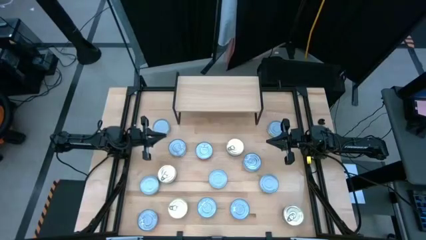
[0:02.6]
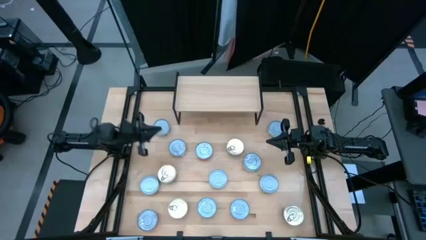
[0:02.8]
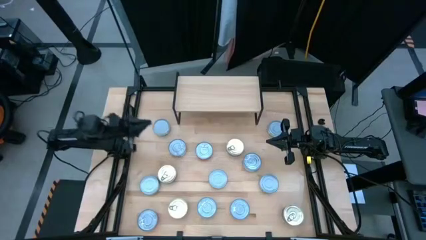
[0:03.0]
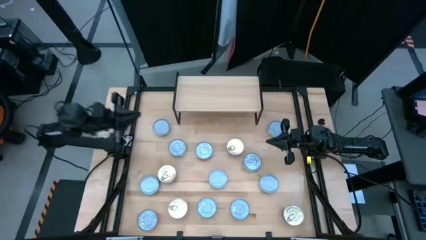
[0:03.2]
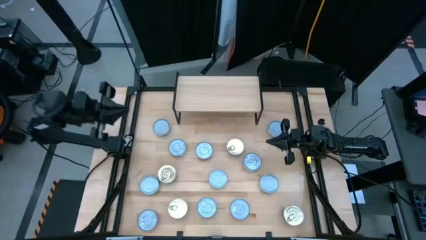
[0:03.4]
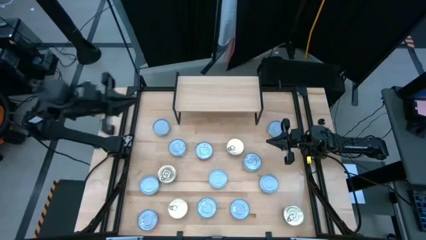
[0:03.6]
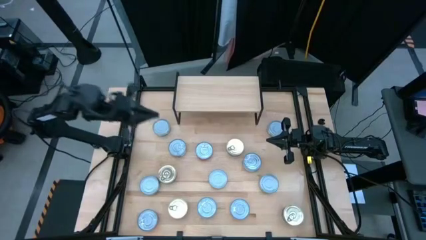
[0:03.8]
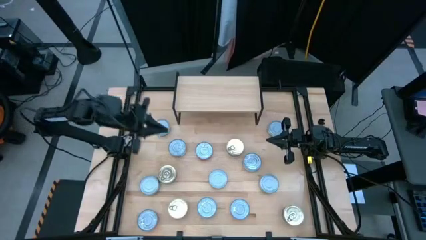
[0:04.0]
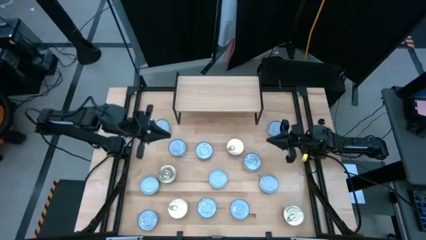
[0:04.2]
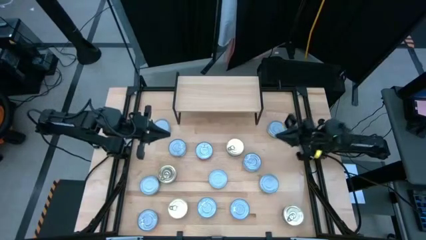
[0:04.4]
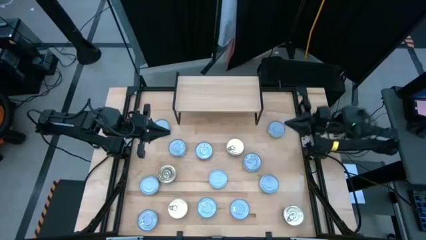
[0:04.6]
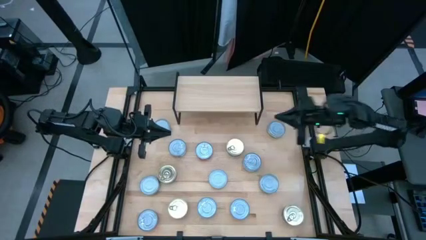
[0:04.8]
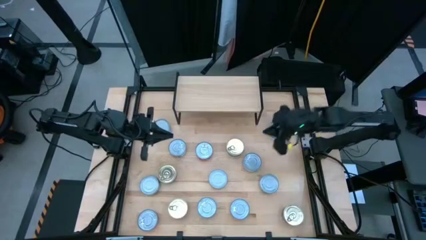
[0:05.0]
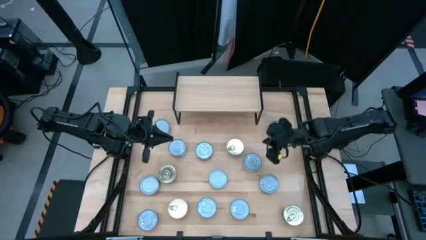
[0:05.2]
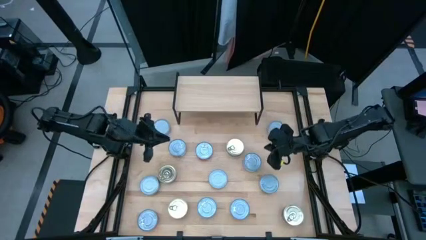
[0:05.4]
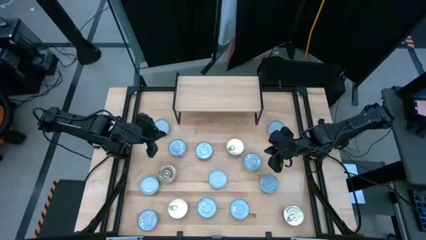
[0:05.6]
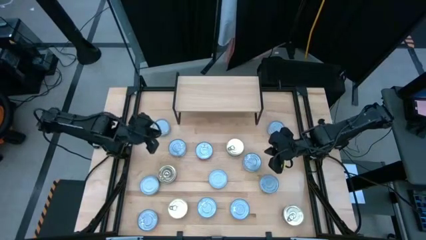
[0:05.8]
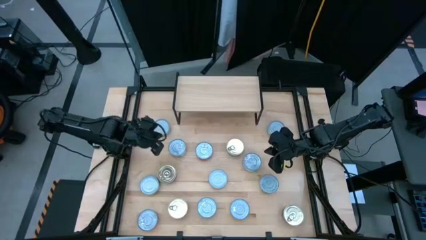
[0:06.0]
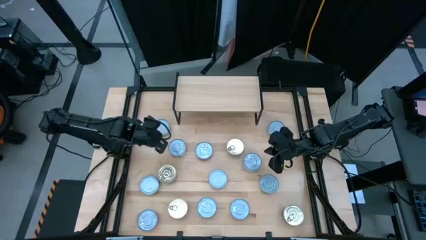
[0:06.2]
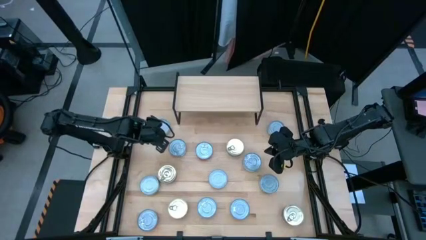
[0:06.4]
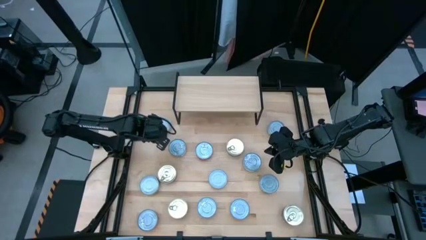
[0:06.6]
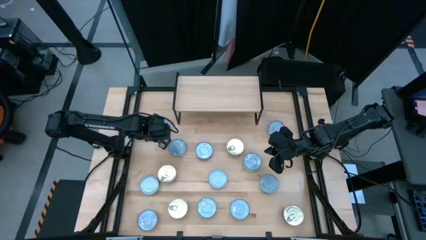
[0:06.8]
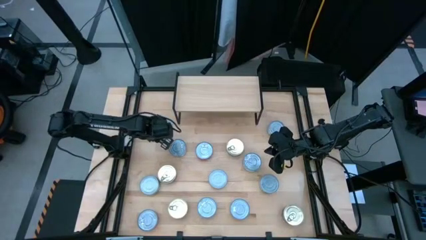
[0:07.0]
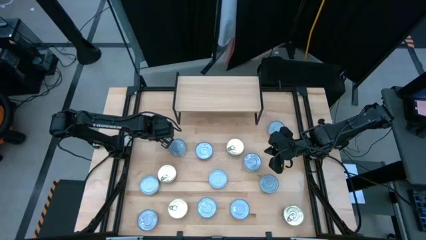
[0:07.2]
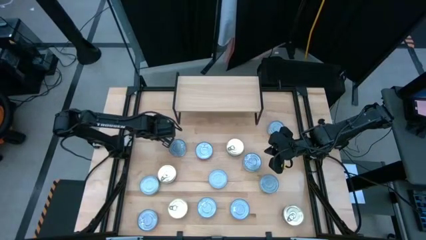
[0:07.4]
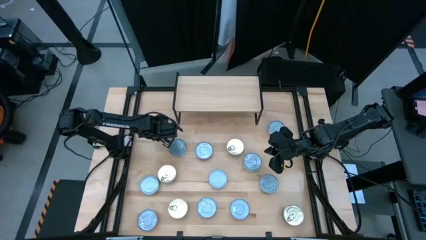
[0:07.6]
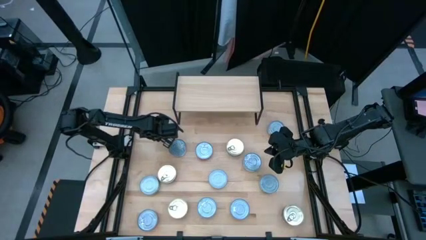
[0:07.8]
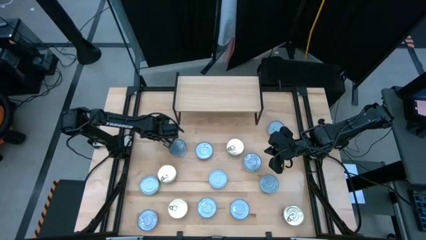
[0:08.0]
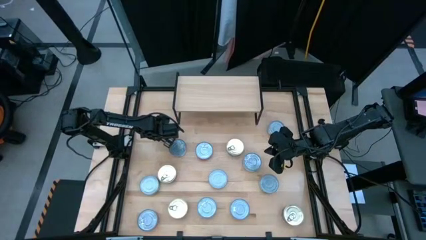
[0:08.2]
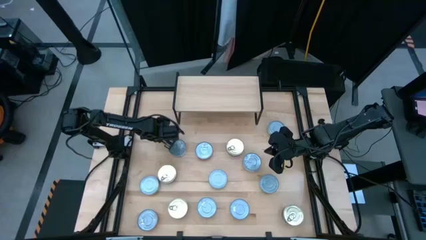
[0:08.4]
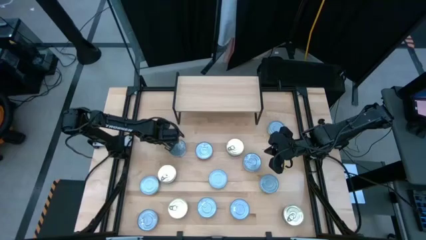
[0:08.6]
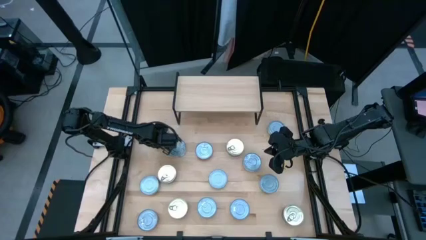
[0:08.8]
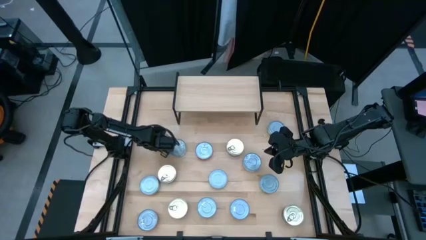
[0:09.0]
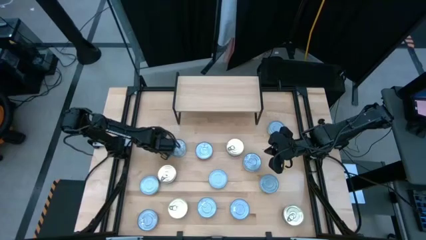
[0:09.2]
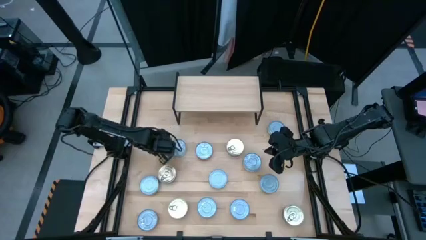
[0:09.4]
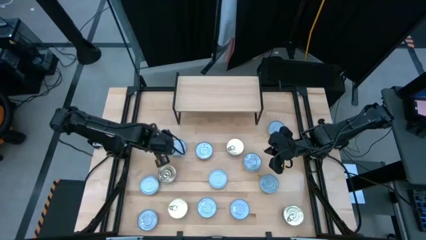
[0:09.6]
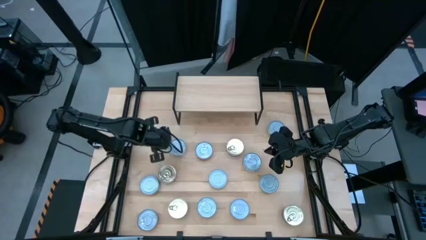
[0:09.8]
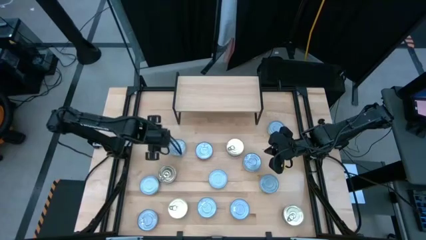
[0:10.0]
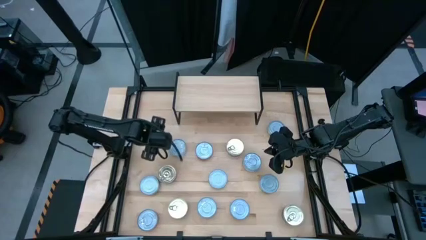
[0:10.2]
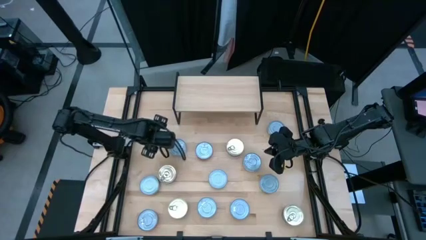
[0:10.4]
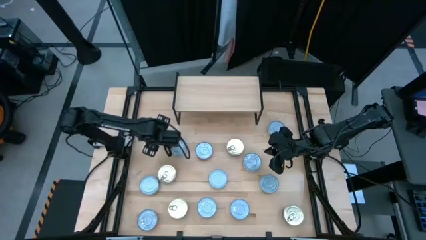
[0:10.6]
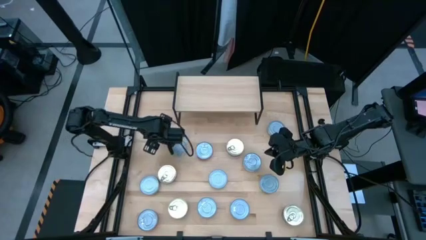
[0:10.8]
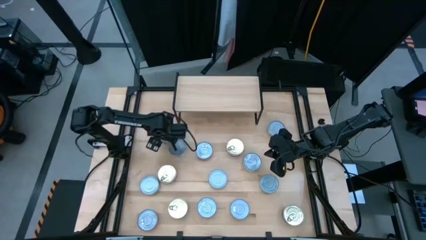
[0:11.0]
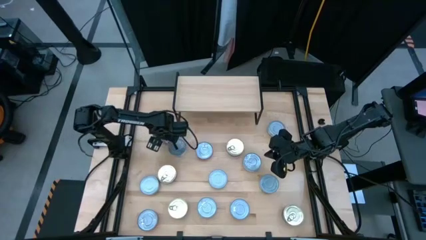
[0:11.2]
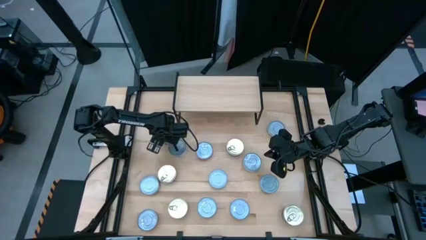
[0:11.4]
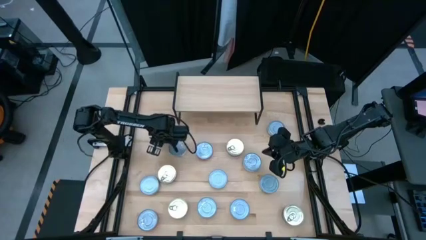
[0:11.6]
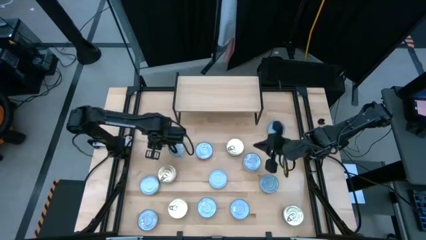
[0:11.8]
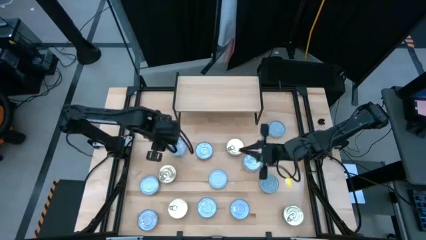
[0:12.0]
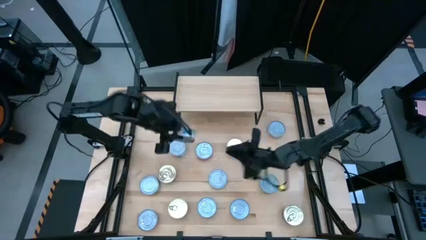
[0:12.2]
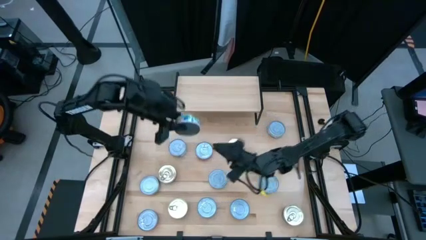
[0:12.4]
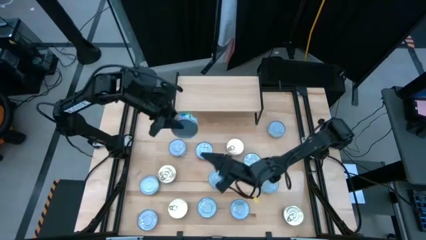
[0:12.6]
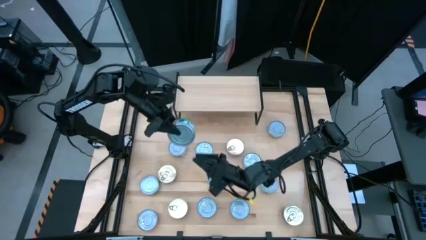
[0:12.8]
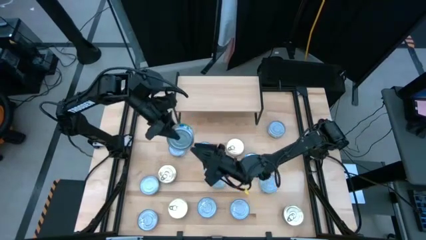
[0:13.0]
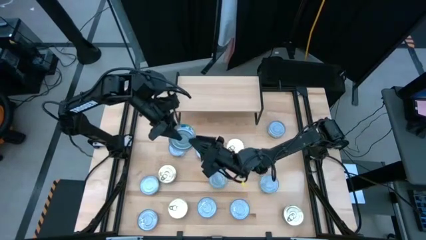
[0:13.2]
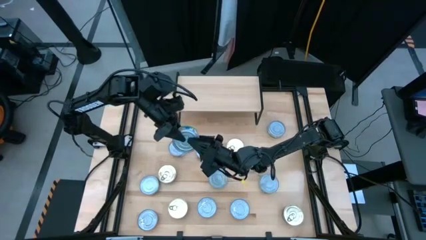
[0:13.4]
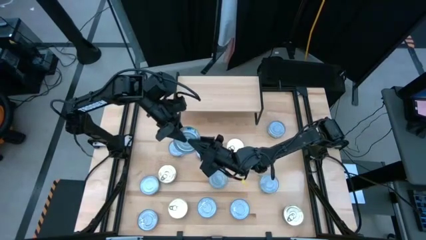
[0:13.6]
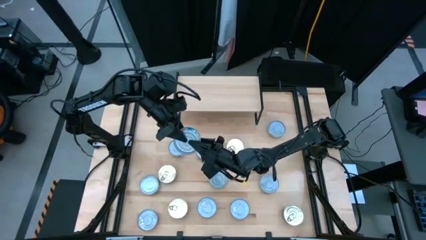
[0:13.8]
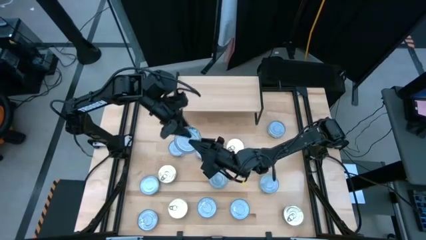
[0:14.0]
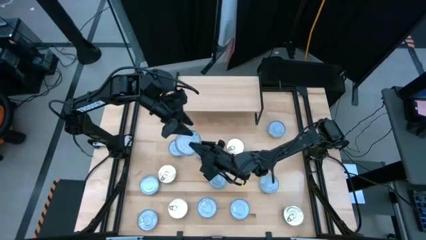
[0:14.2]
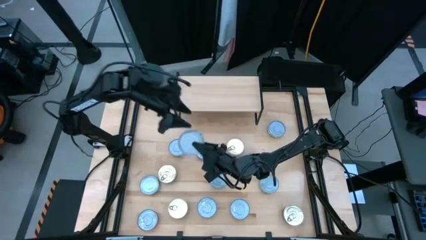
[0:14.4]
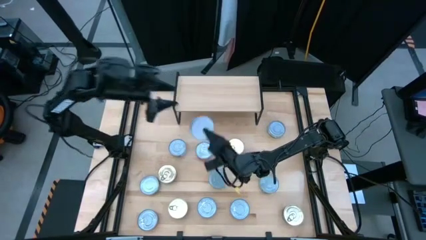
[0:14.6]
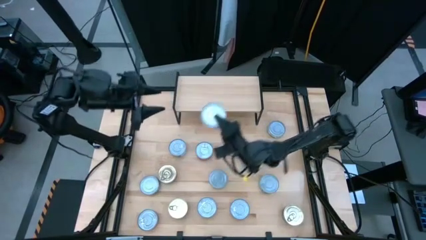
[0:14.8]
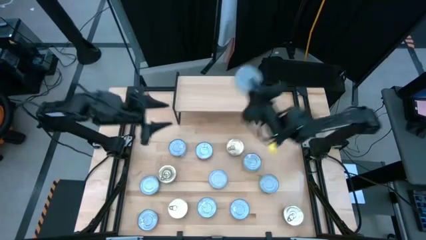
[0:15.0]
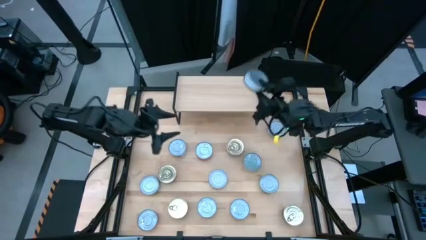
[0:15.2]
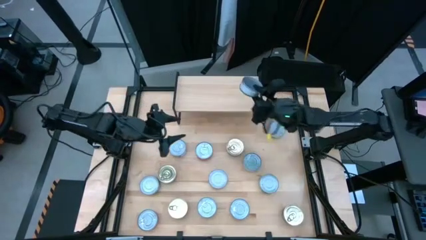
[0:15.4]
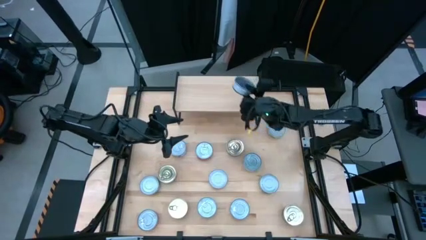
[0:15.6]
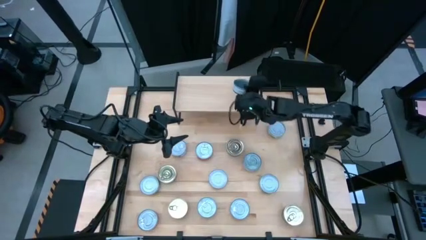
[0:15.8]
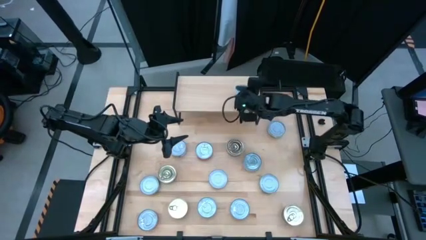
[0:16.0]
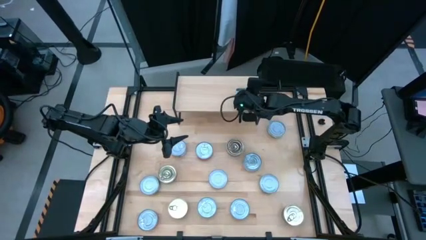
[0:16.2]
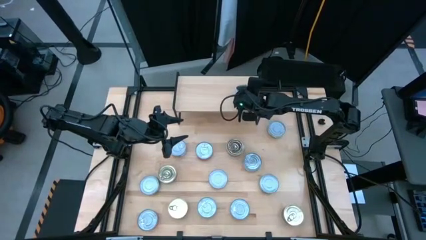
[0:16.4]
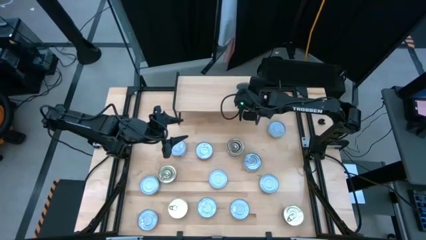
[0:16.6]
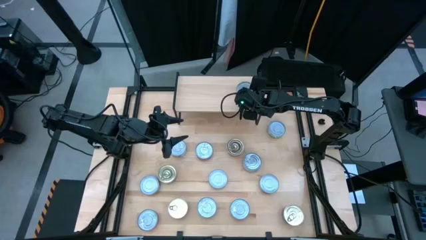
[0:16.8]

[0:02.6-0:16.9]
Task: Stack canned seafood by type on shelf
Put the green tuna can on the shelf
